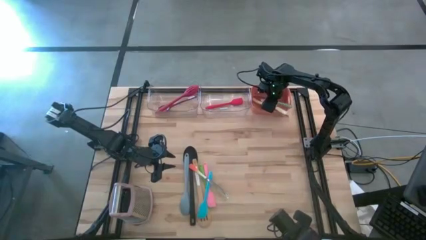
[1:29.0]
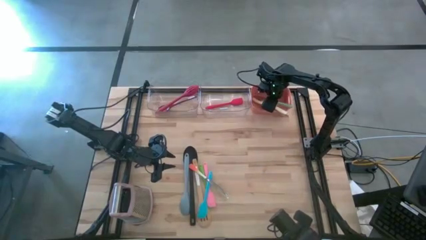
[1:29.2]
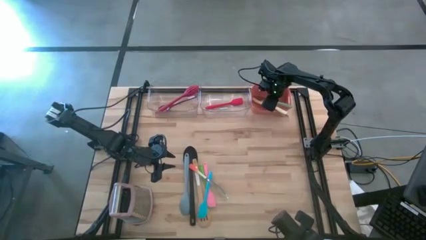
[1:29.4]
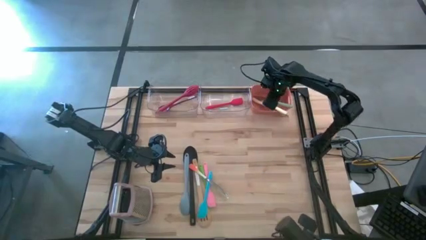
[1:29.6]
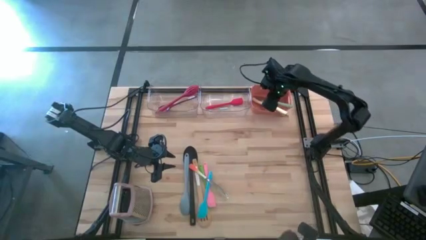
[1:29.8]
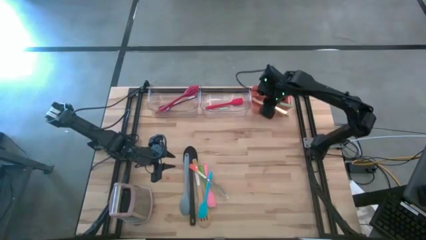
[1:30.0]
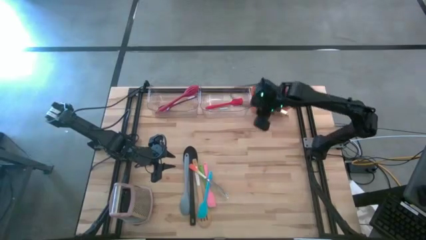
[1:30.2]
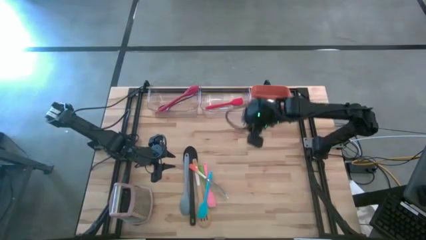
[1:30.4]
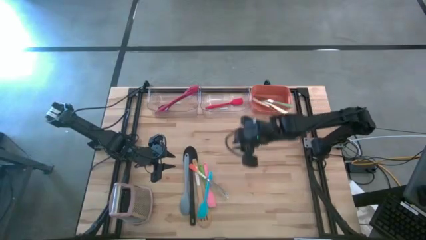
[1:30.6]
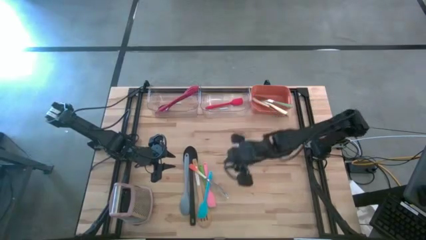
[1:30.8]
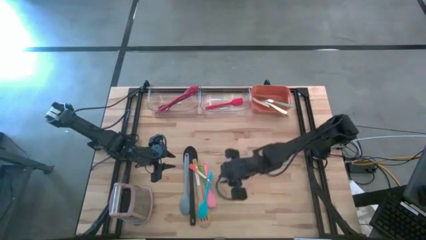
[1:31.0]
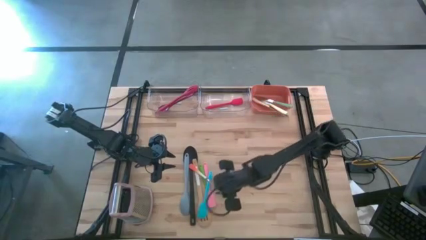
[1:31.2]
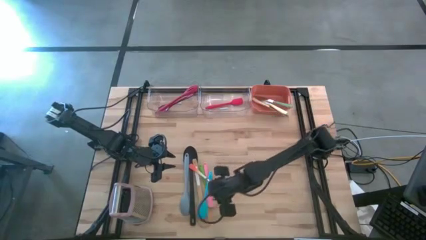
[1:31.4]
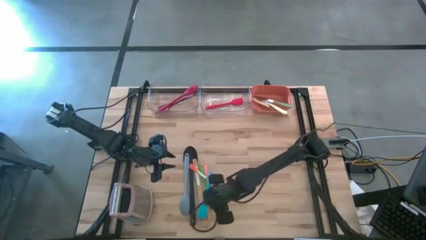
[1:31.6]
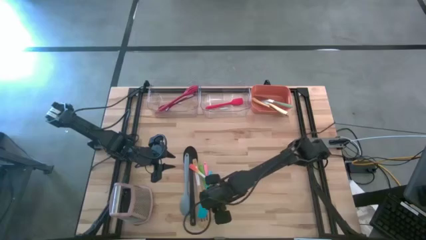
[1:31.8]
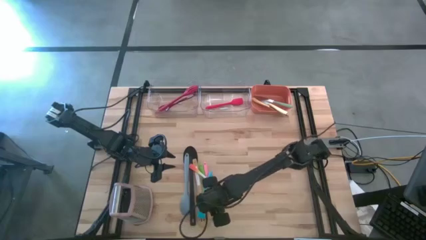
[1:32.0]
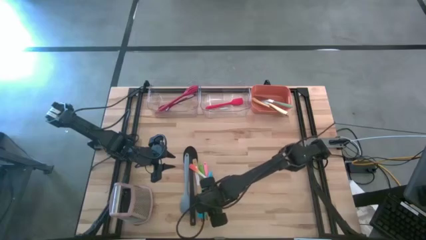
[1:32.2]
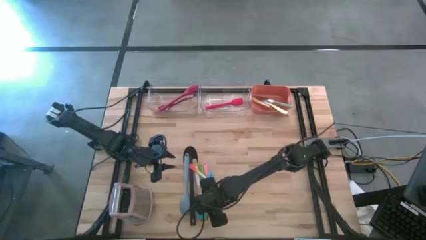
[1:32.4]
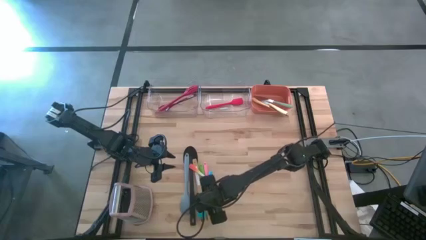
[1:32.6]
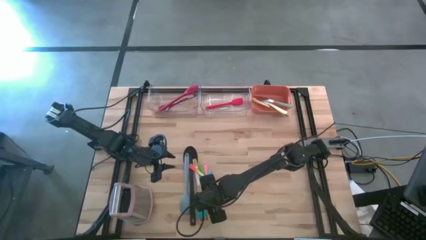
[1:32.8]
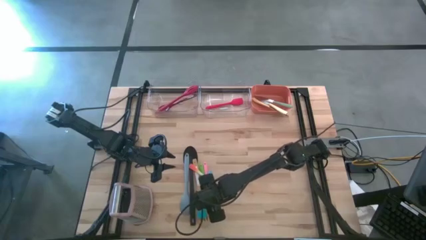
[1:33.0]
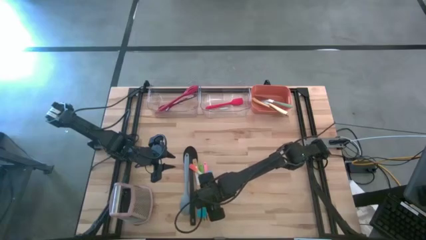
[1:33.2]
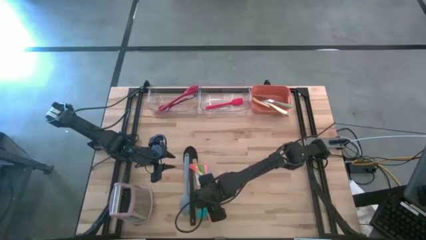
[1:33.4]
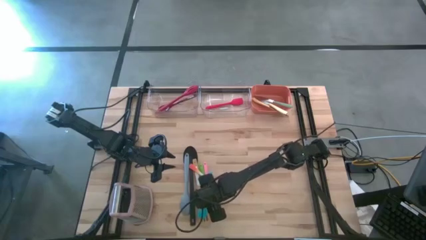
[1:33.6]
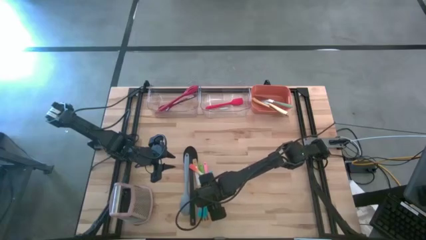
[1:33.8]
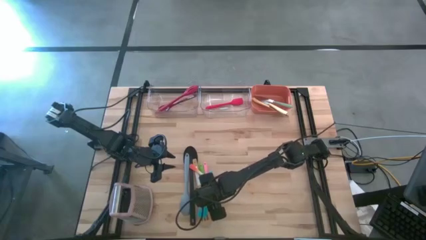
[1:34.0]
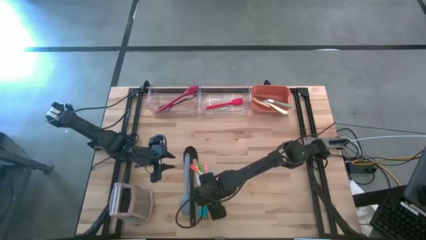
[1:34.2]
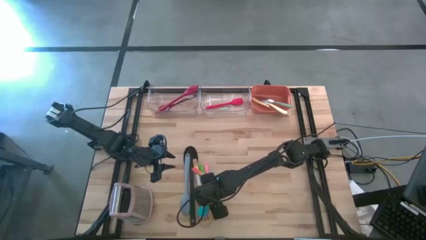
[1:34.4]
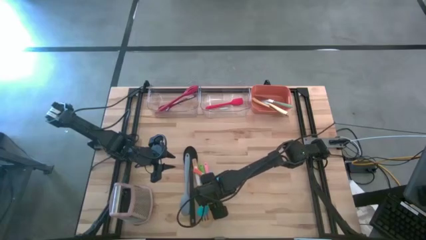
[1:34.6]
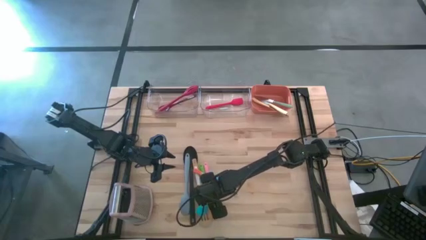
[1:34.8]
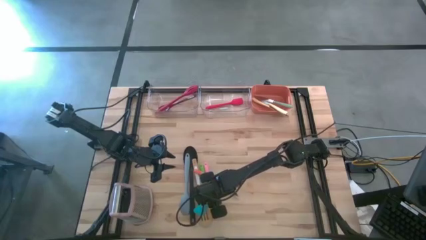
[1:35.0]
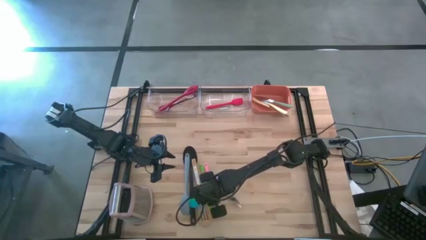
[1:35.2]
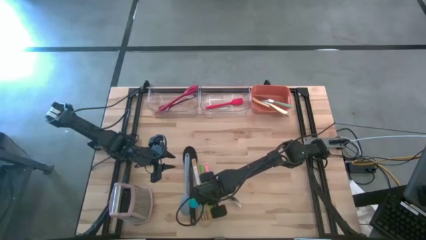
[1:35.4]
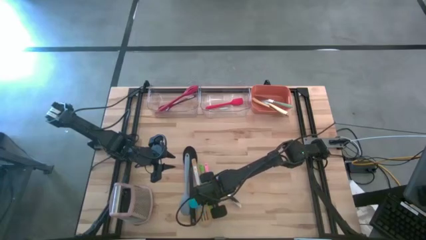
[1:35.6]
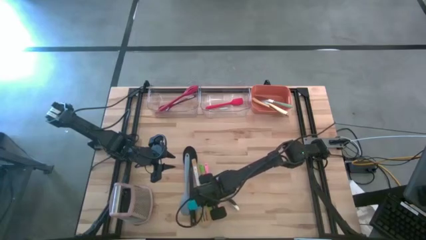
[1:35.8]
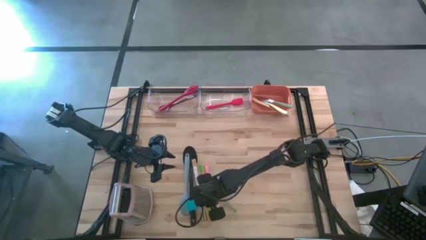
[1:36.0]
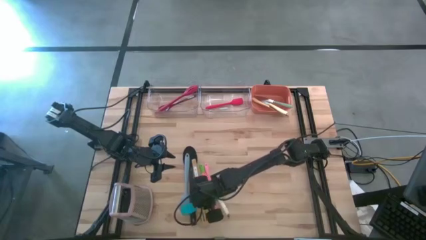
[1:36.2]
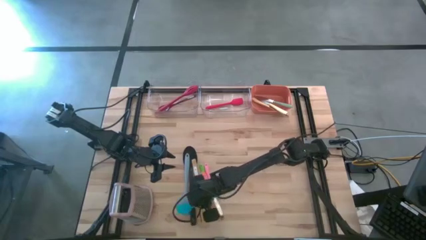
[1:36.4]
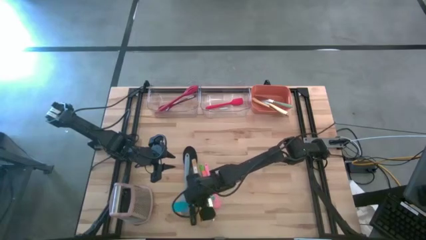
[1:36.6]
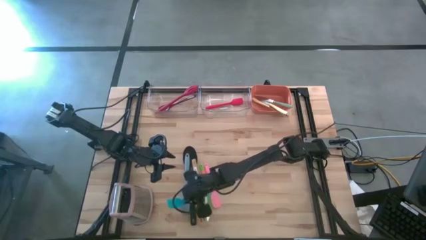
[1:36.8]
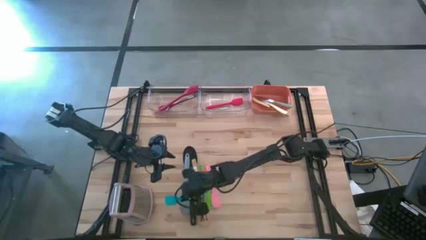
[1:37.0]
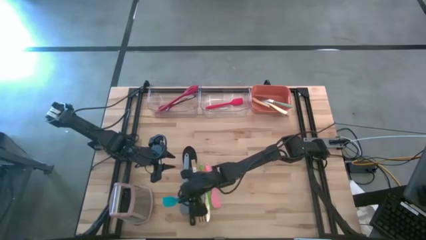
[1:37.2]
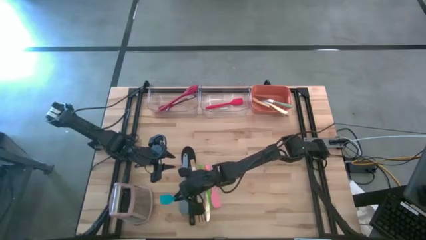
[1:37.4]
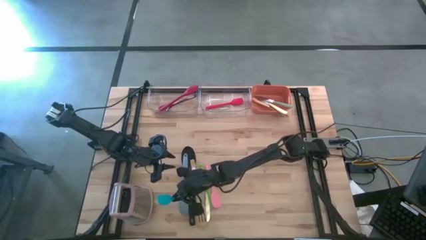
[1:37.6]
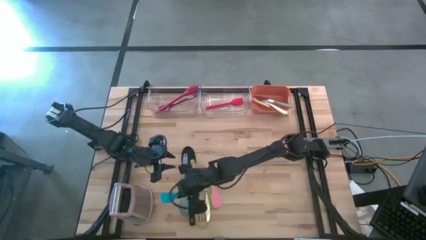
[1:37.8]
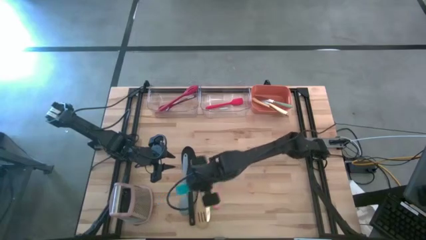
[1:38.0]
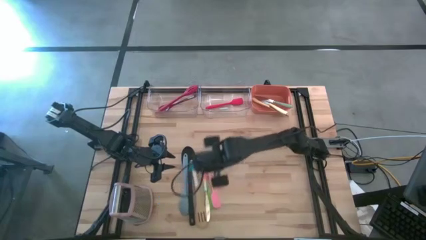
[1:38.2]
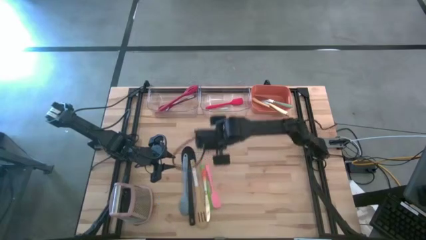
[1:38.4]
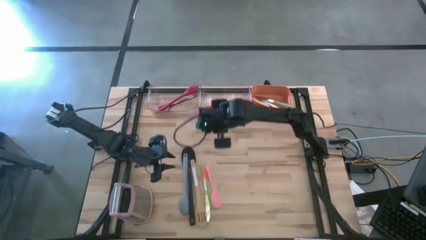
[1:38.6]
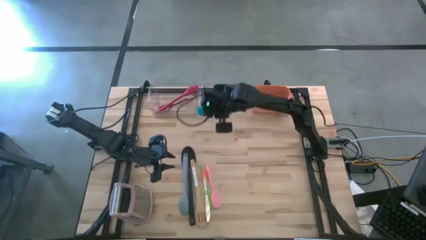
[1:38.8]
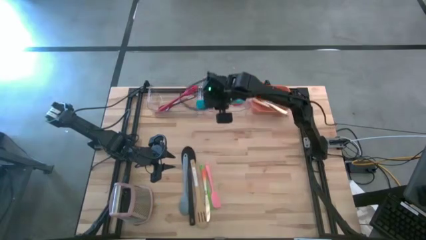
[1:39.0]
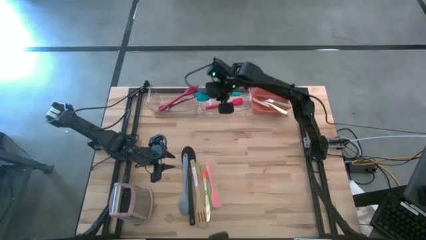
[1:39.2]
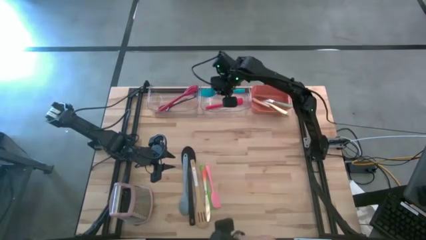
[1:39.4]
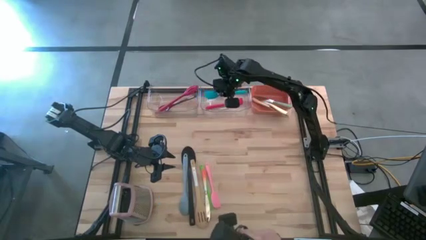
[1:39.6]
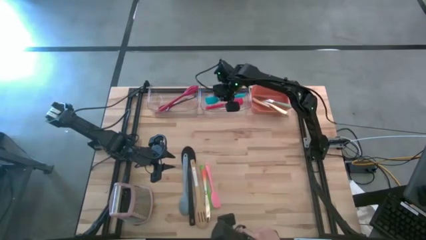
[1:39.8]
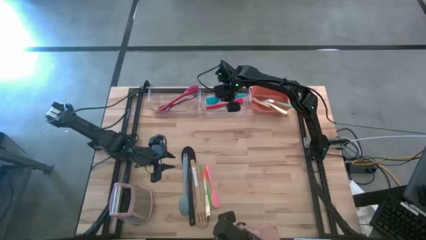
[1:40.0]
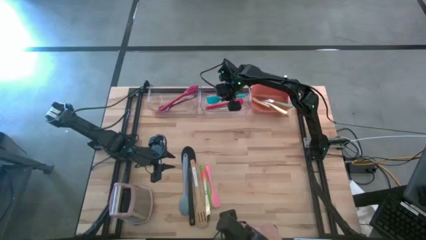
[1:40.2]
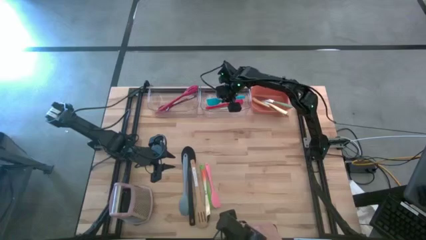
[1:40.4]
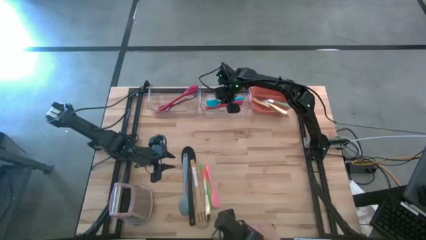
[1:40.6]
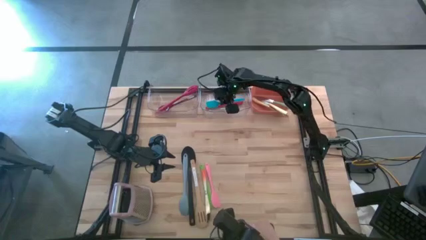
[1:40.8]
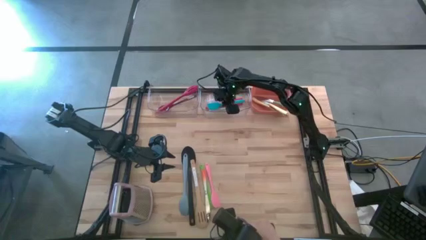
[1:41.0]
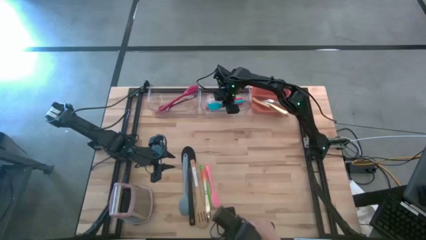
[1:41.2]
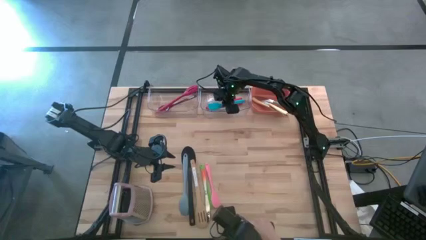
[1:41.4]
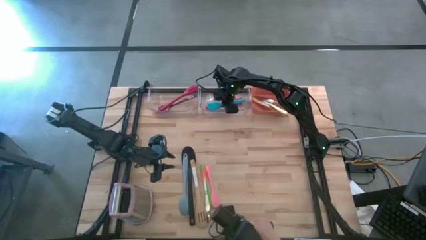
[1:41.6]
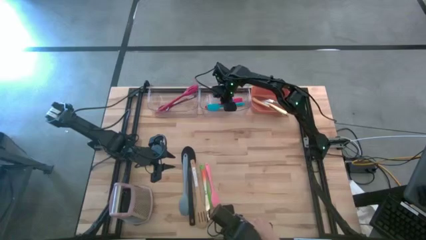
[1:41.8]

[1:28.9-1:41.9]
Task: Pick & Place Kitchen Items
Put the blue spatula into the right transparent bin
